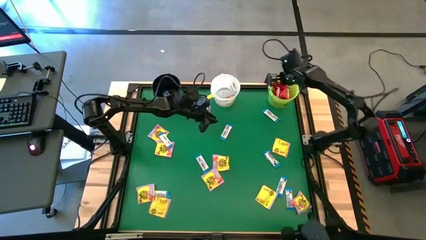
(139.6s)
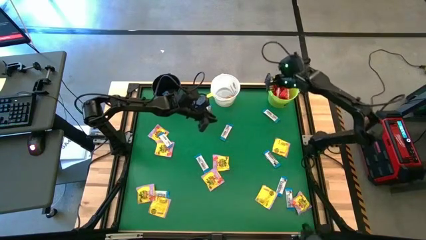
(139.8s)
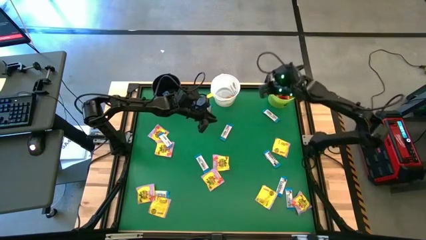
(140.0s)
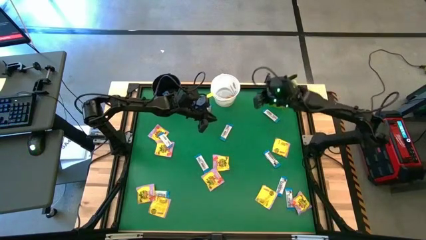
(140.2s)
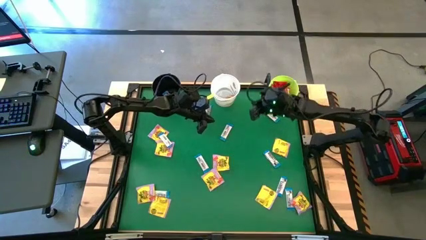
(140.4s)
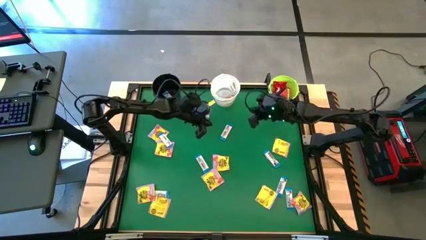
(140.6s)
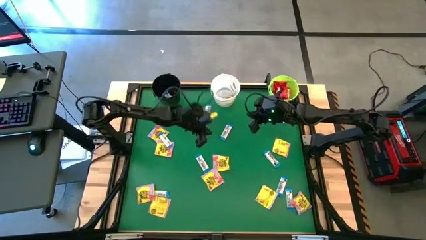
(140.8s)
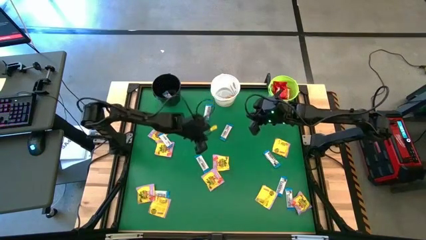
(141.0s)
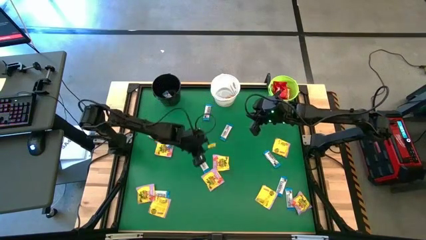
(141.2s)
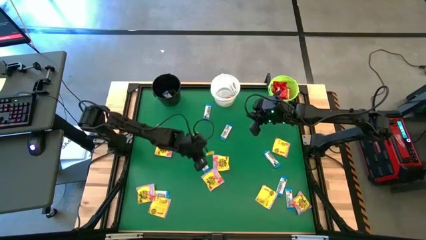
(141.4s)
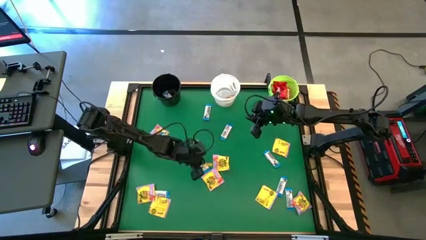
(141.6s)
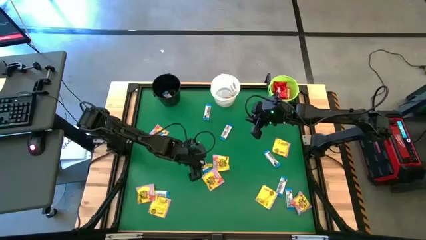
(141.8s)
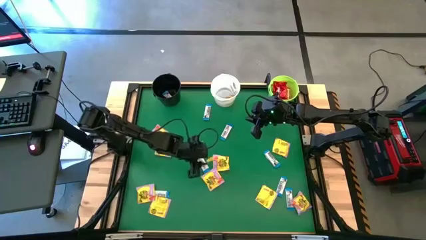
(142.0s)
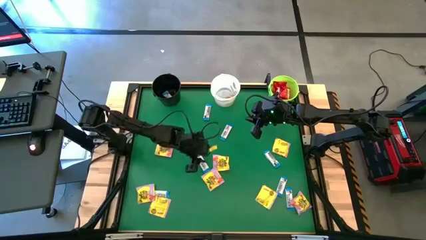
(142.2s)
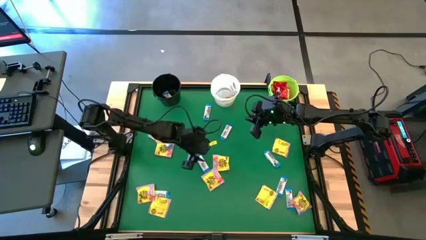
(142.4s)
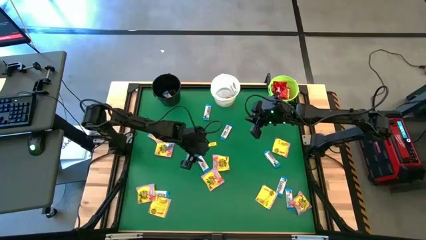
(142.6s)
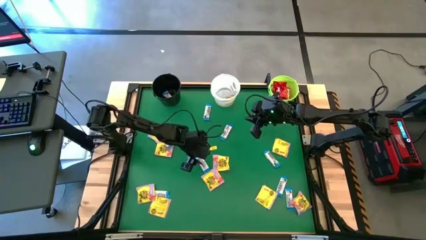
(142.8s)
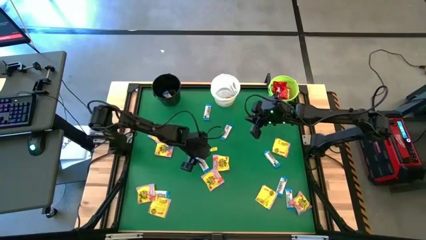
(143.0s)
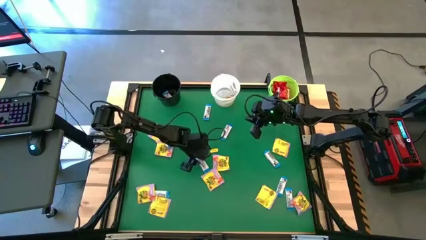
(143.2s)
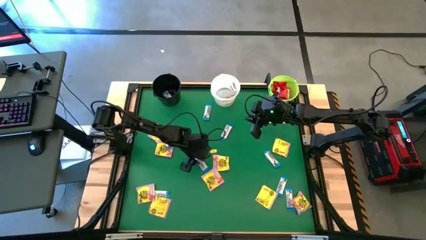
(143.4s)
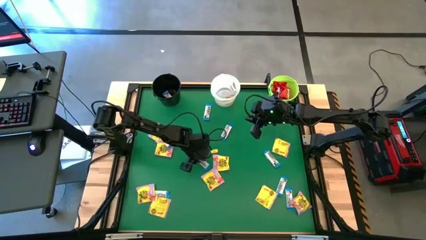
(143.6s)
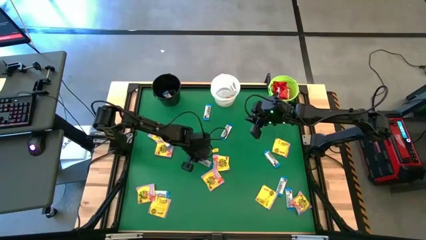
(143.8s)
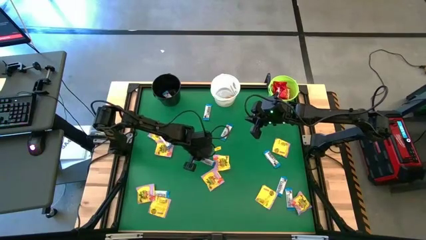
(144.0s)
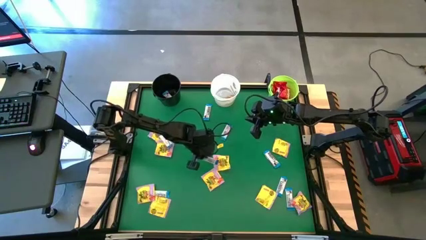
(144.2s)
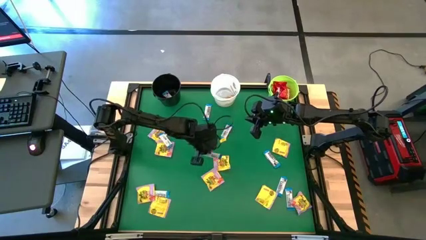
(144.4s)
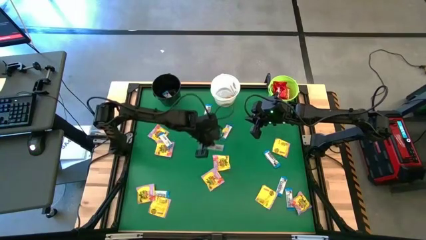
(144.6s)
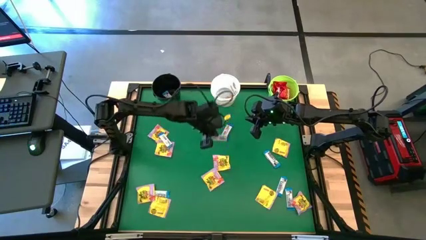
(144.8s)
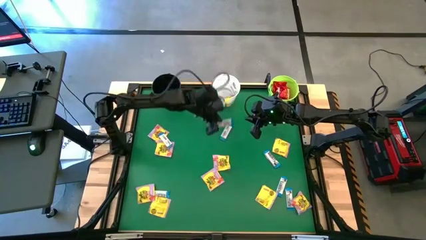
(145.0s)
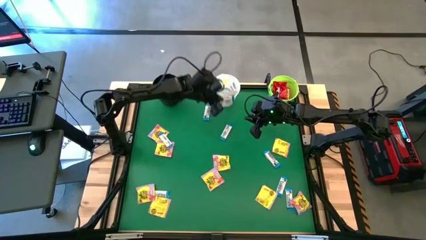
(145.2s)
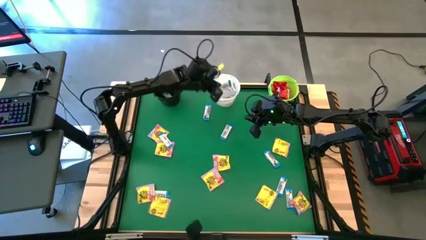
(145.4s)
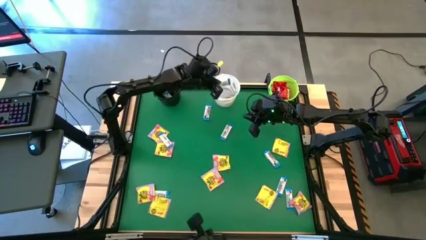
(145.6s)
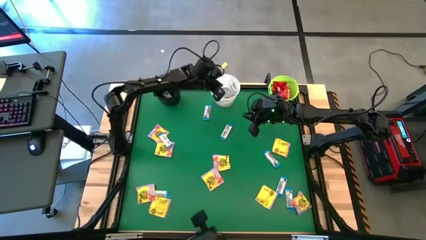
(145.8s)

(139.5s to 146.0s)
Task: Sort candy by brand, put in halloween buckets
Put the white candy into the white bucket

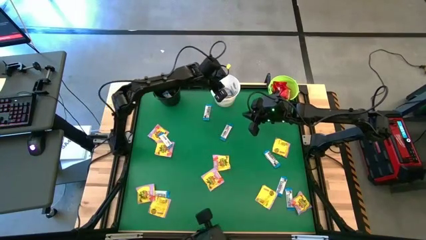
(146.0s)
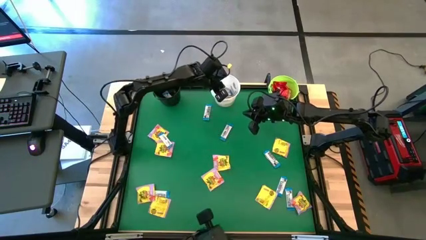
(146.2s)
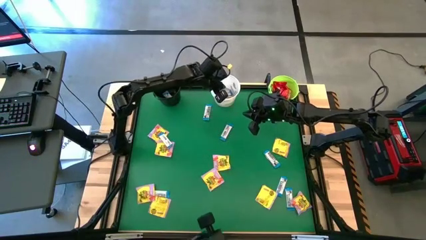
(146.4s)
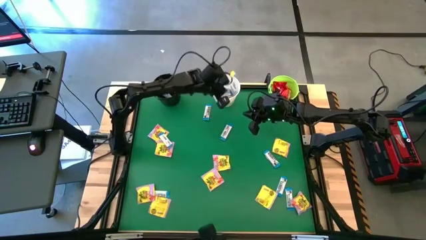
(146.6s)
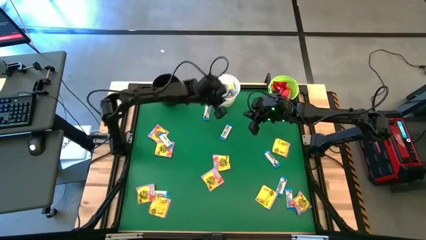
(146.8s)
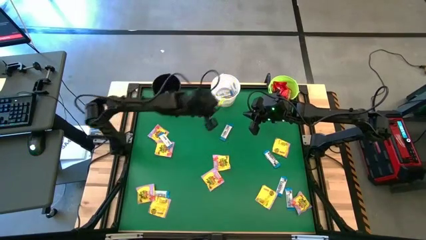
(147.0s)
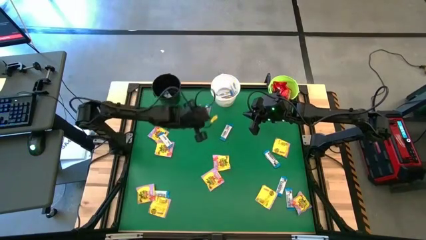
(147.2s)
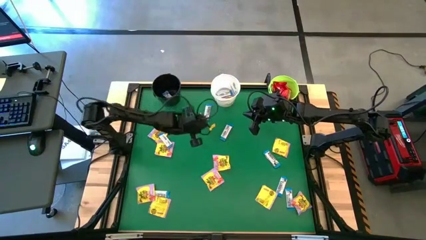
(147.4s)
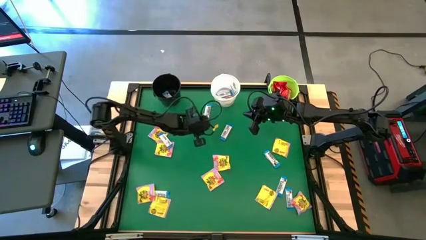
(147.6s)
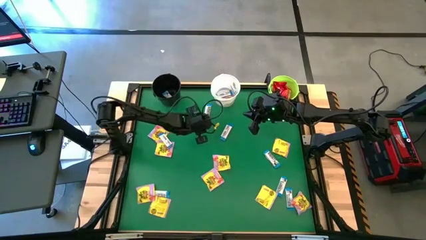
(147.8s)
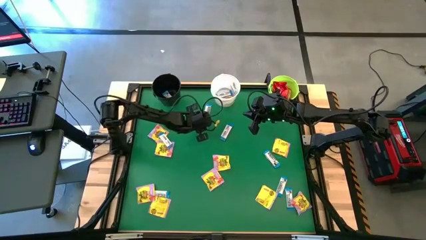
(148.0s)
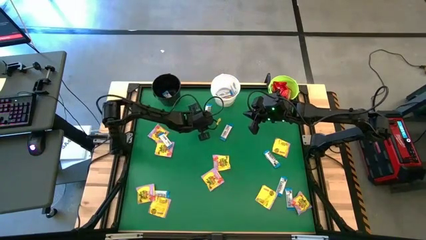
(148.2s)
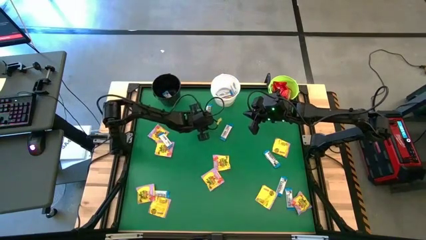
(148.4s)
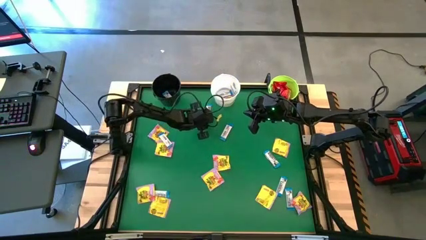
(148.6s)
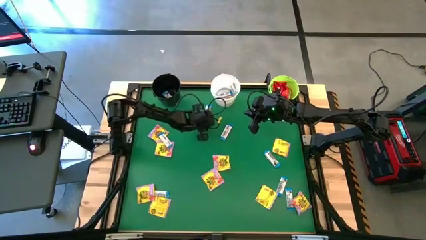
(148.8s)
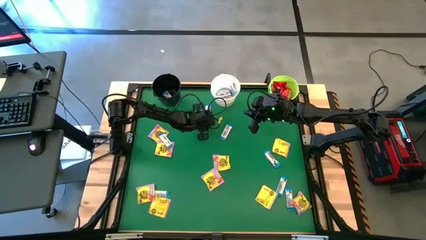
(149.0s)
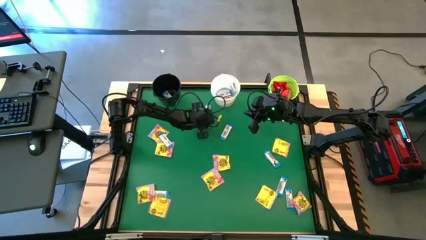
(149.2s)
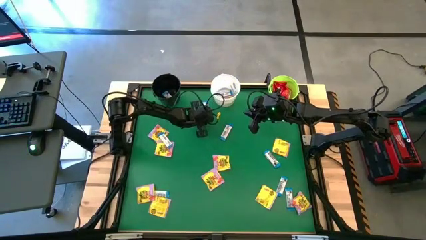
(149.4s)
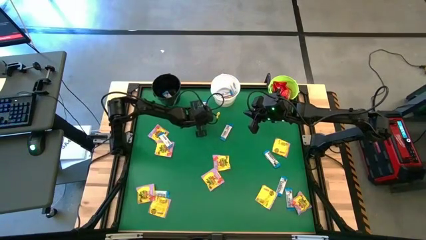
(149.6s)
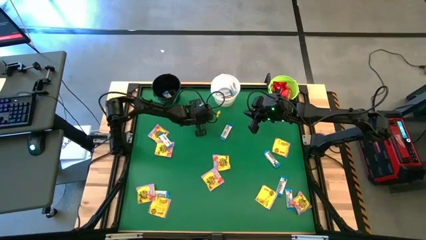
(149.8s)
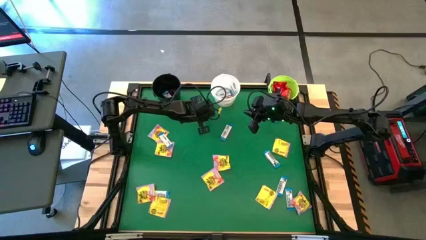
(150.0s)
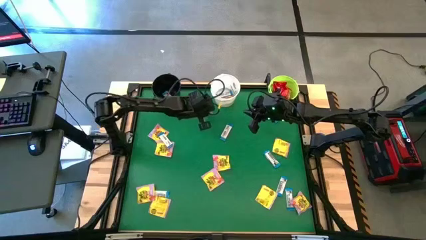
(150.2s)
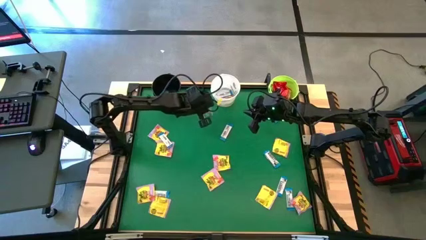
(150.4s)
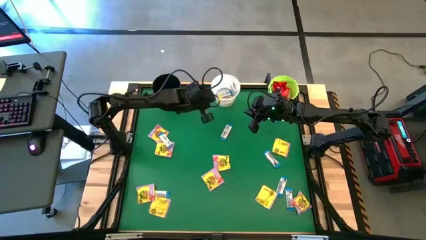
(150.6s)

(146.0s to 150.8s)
Put the white candy into the white bucket

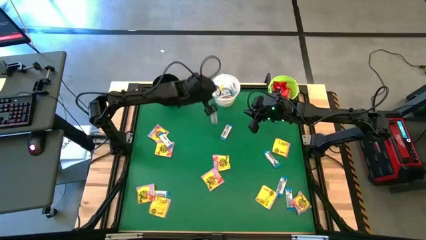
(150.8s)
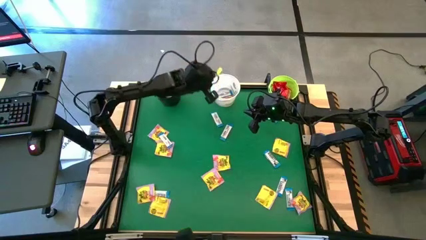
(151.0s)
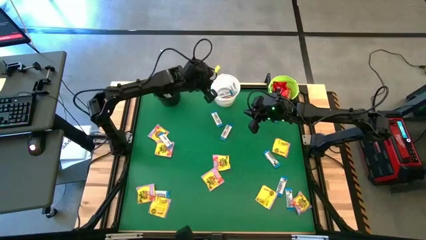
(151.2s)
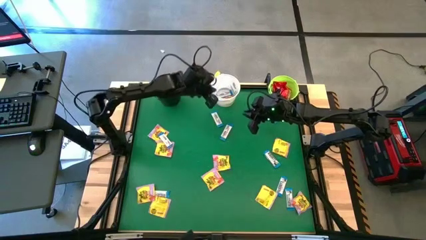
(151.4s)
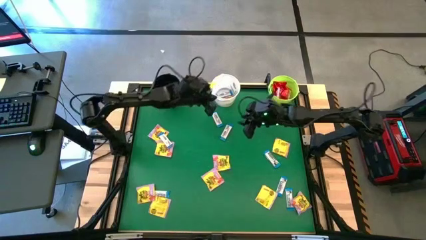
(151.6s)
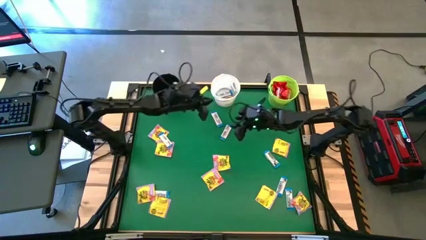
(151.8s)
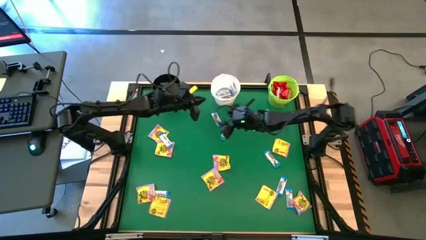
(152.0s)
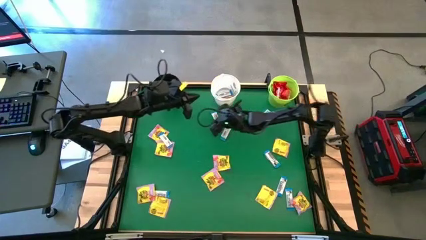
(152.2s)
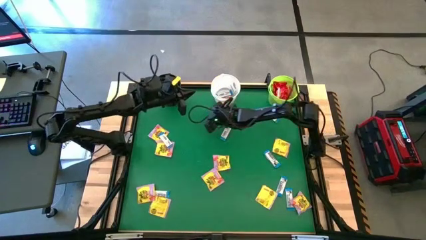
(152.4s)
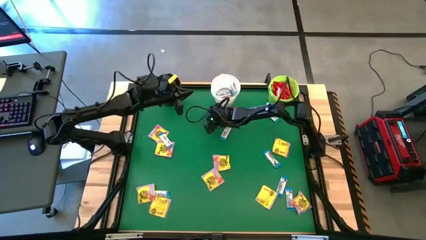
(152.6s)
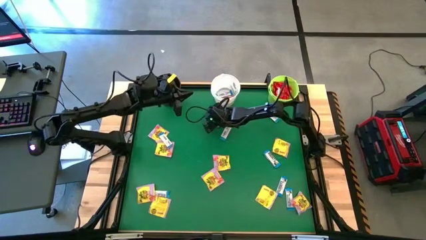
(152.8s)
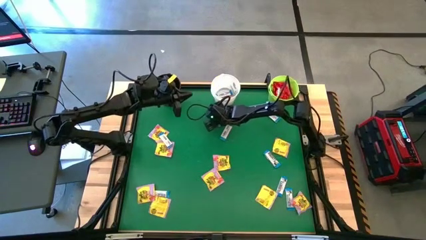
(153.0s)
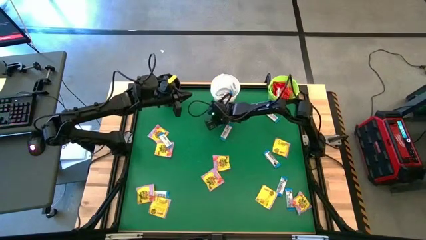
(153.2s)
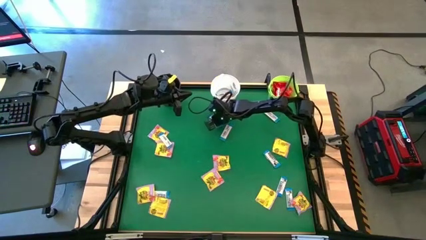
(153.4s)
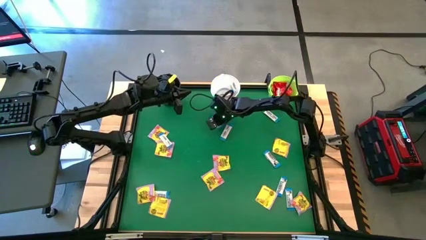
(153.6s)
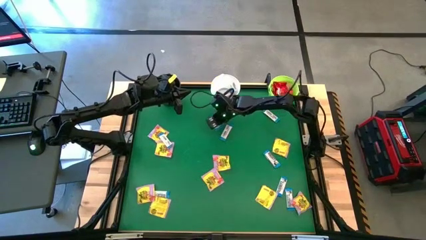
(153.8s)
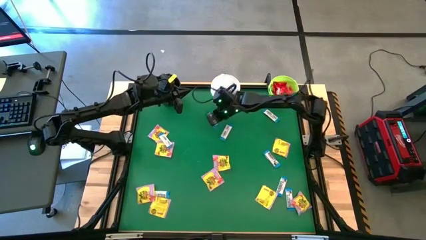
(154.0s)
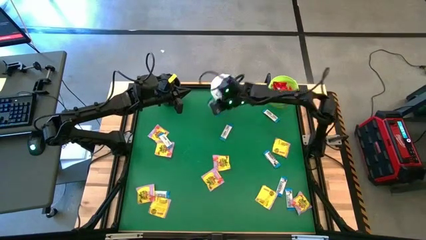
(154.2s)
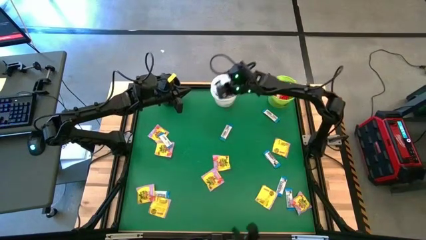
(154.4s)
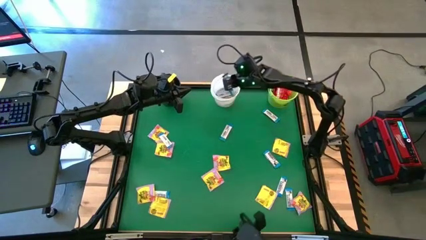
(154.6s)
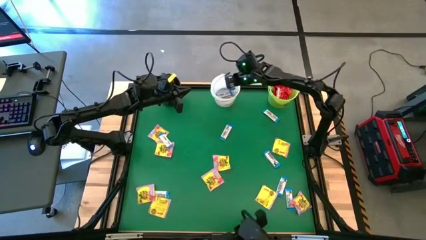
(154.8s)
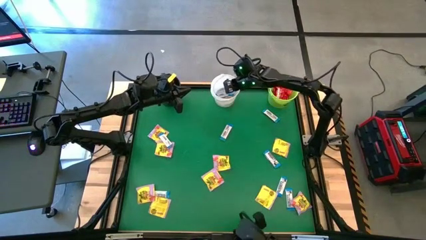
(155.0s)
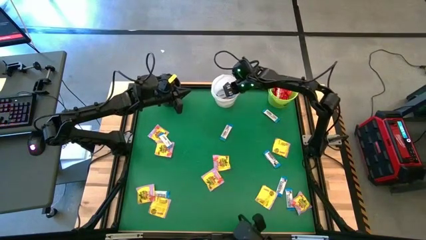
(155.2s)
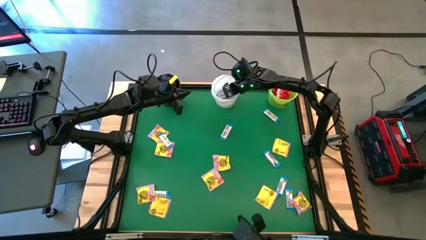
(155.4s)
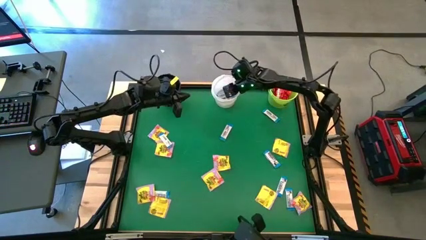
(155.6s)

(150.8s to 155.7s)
Put the white candy into the white bucket

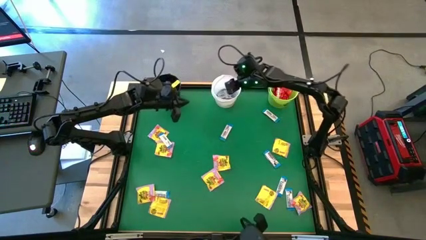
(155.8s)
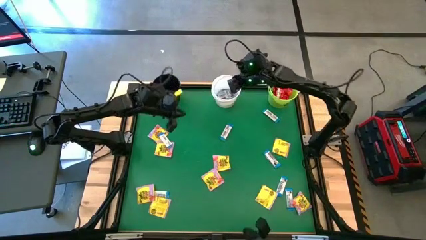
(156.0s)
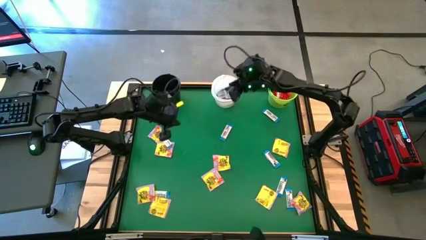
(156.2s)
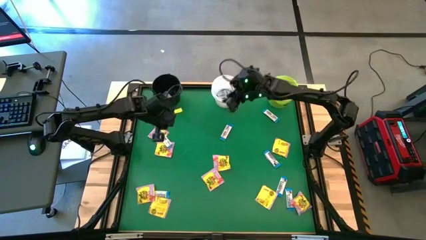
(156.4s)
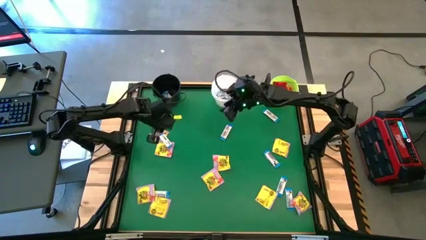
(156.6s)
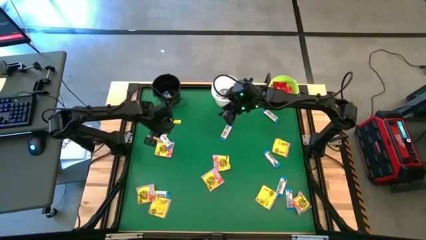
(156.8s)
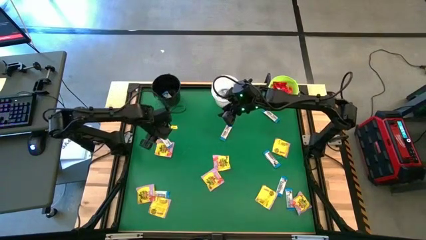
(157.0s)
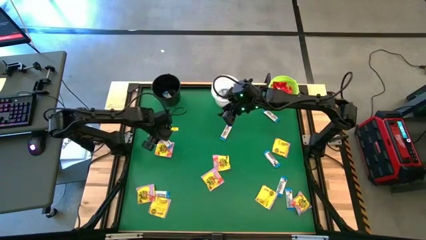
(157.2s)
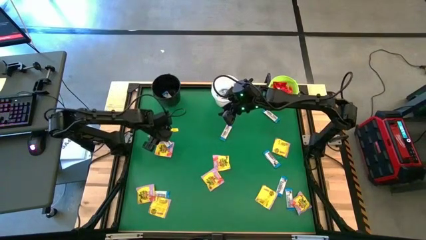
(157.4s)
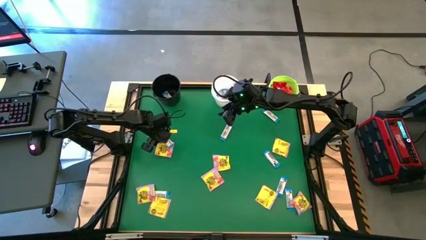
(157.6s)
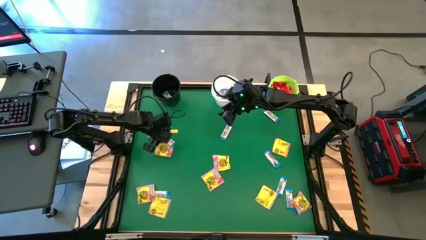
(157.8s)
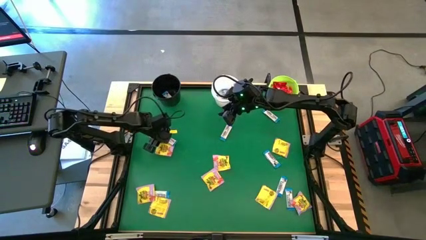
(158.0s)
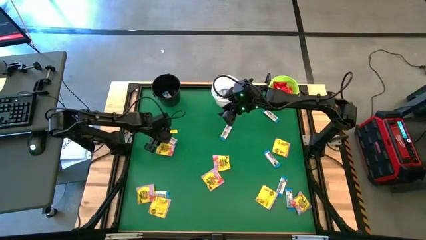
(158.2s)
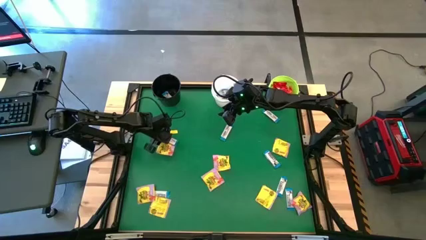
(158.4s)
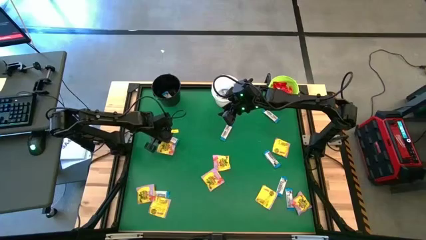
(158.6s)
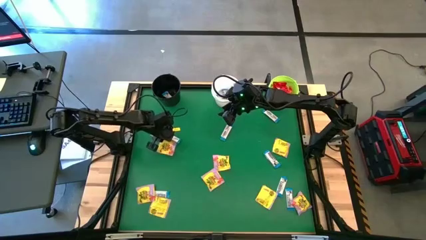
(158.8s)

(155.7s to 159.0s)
Put the white candy into the white bucket
